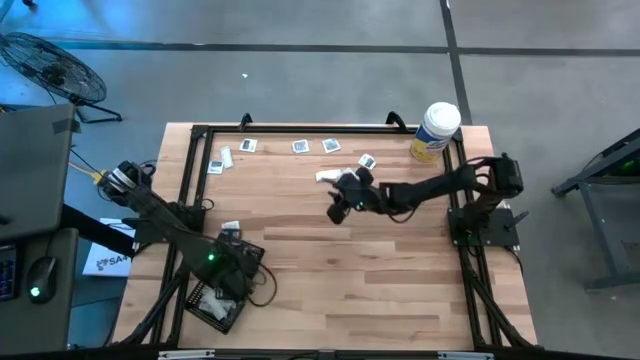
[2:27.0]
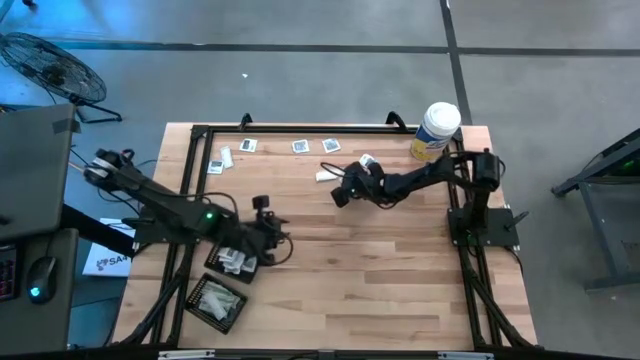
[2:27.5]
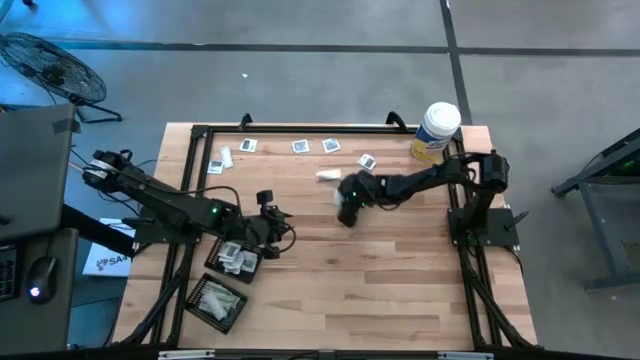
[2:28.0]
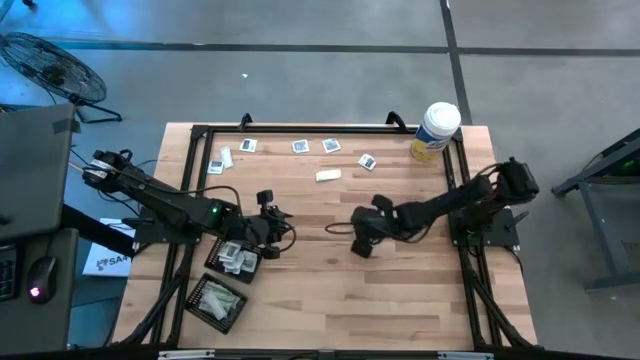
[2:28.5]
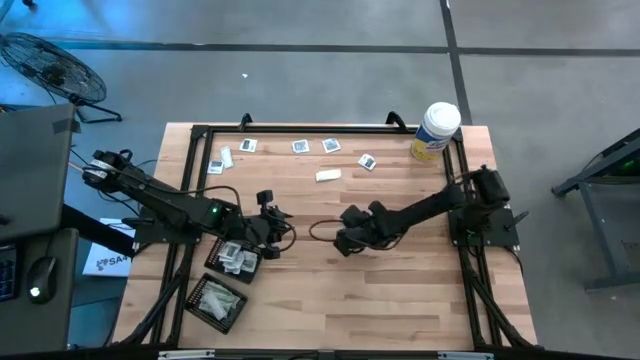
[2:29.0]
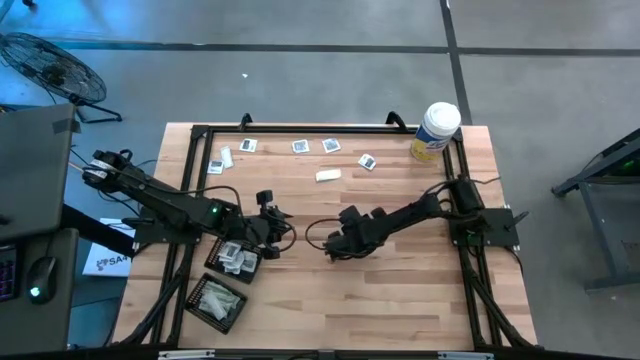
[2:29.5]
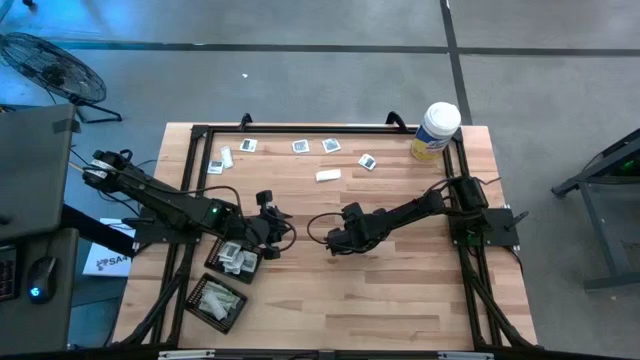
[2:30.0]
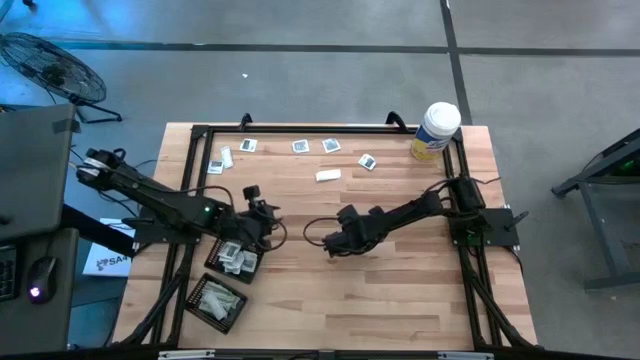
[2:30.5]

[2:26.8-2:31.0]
Task: Pick & Place First Aid Supplies
Put the towelette pack into the top black bin

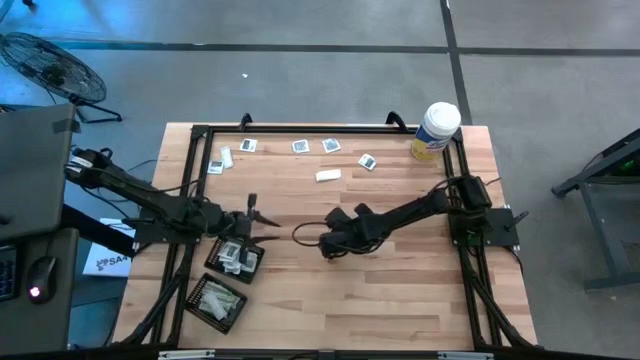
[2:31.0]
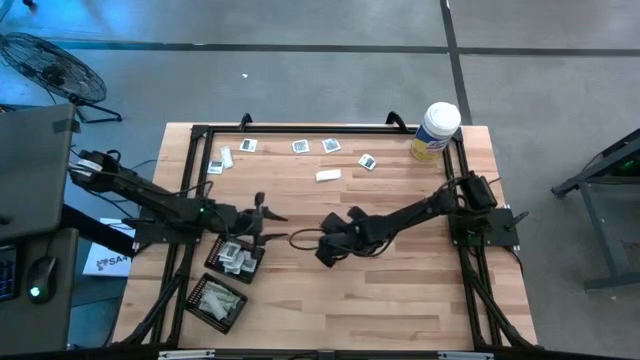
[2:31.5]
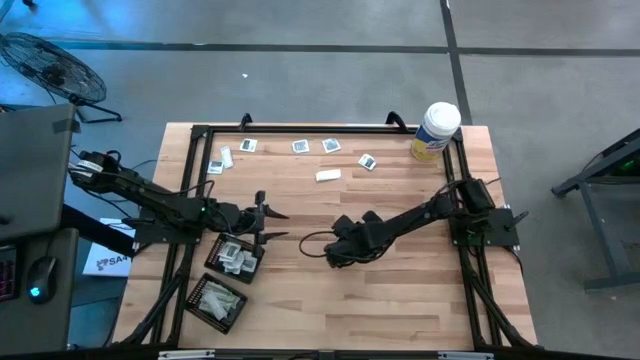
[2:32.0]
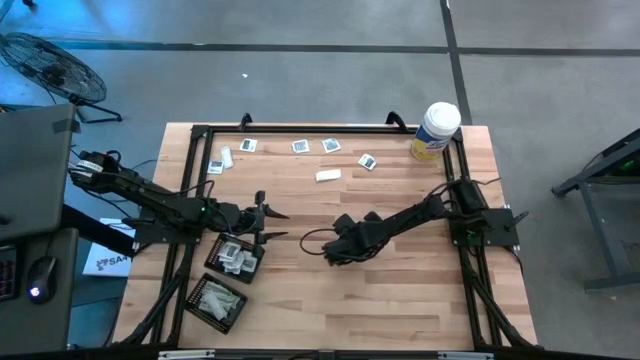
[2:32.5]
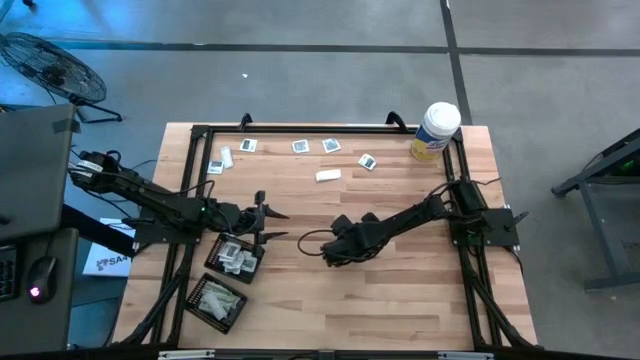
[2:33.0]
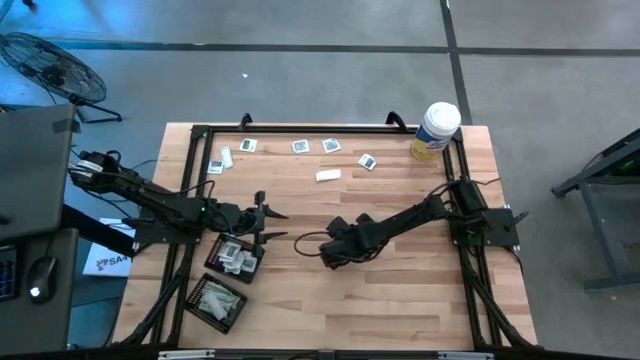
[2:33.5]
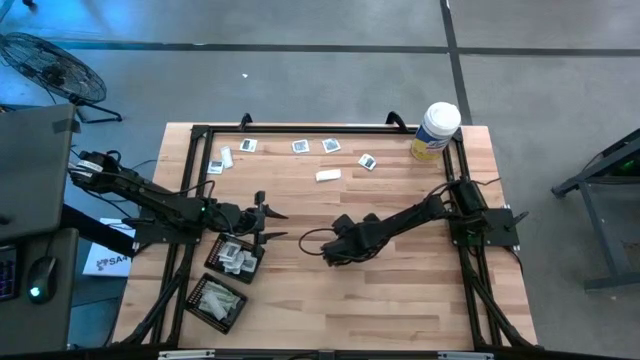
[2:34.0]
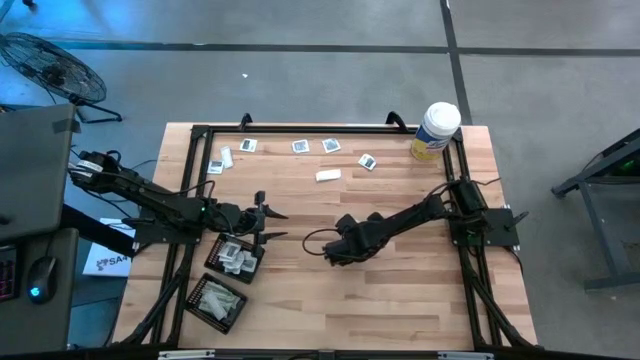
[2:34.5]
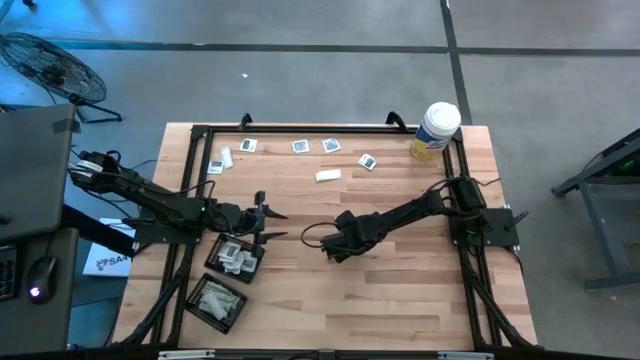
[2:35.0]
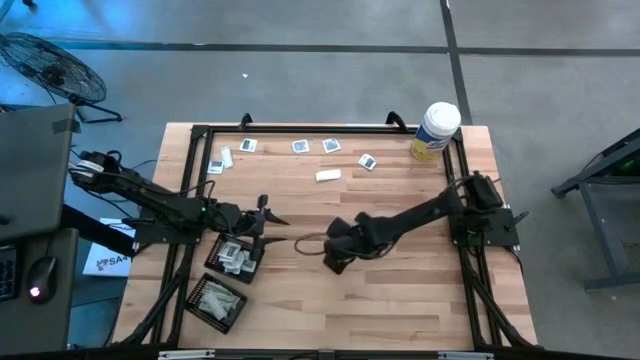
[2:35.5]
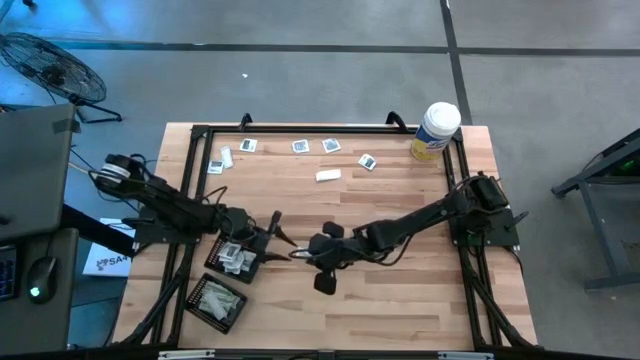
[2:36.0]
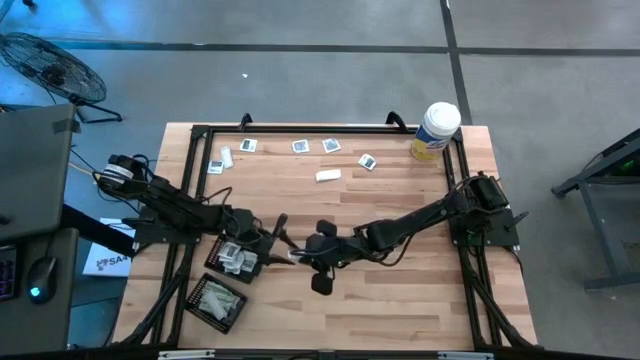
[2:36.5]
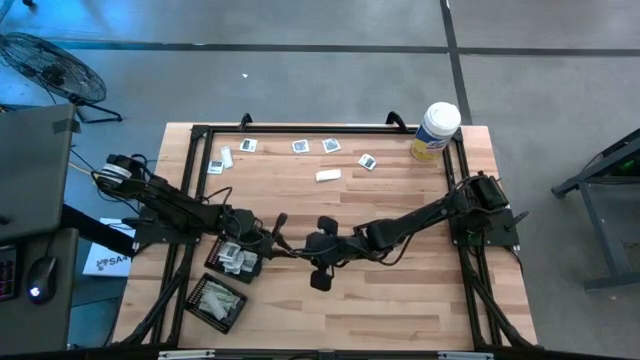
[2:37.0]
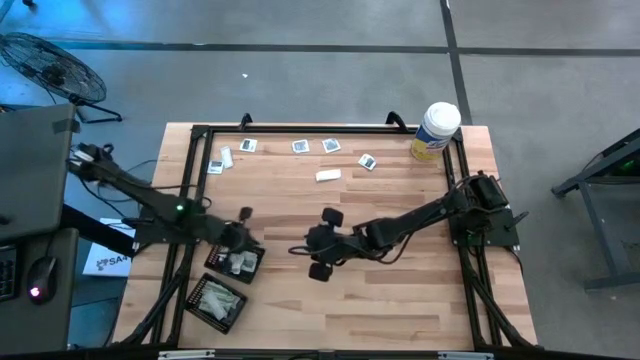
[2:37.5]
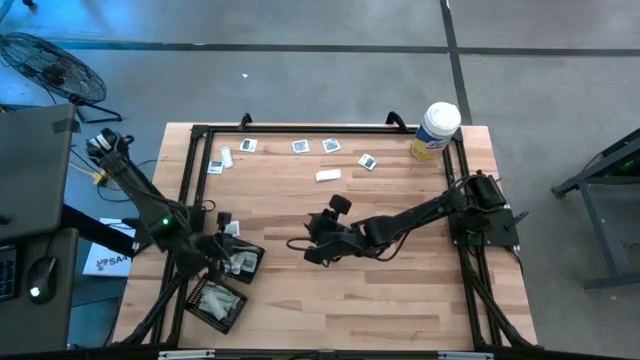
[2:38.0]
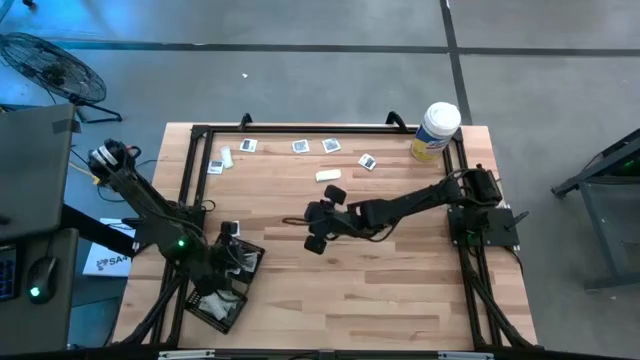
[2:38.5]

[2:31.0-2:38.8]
Put the towelette pack into the top black bin

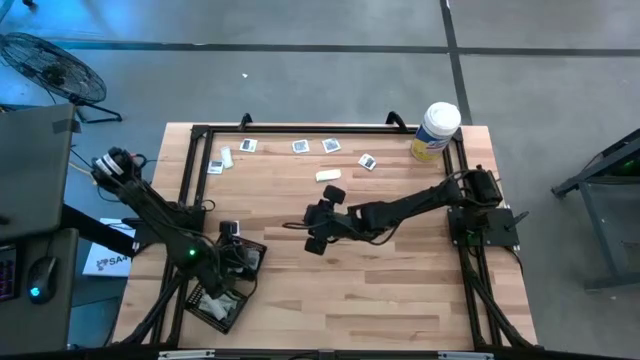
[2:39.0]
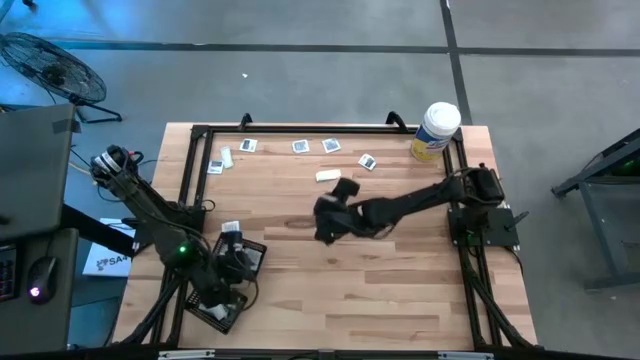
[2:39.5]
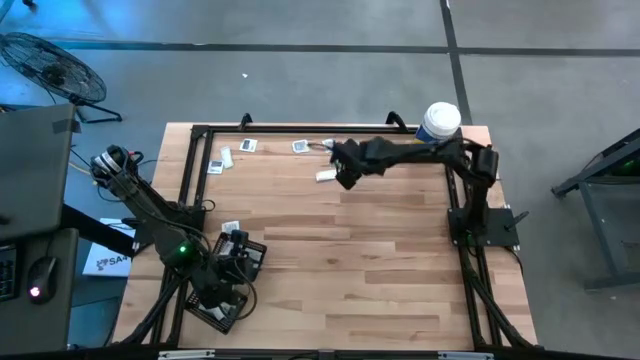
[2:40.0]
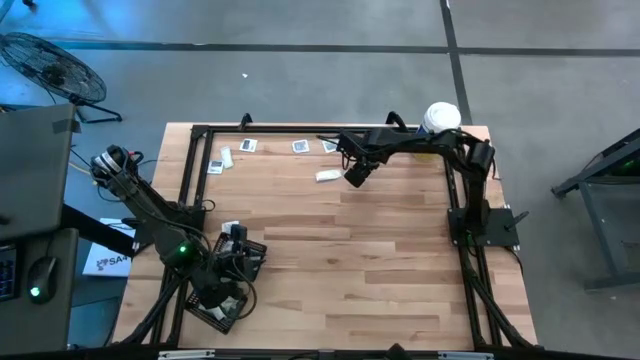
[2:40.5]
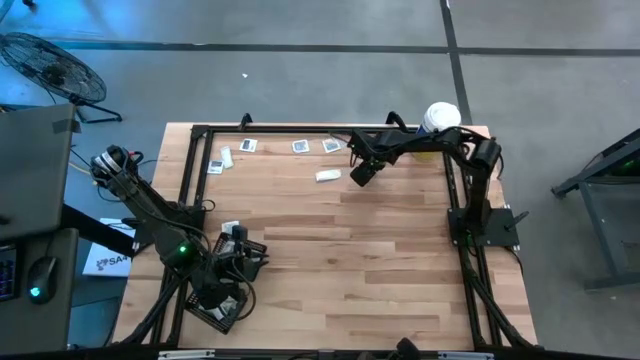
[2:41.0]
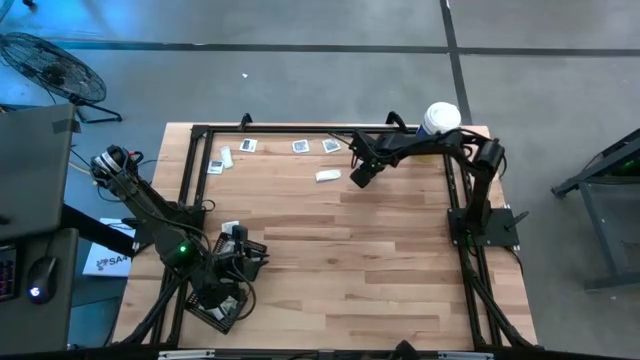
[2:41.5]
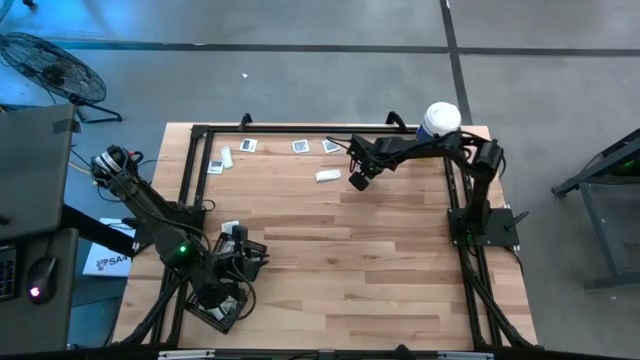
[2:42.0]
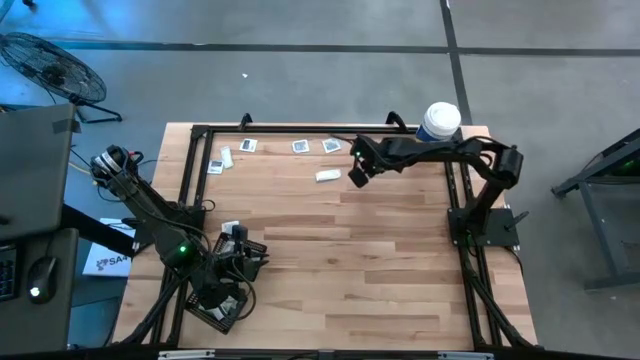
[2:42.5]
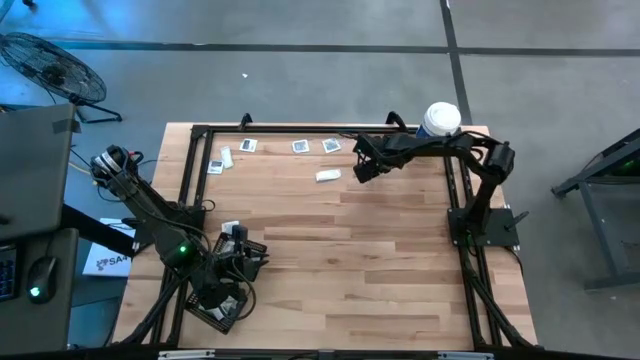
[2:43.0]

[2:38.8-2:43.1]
Put the towelette pack into the top black bin

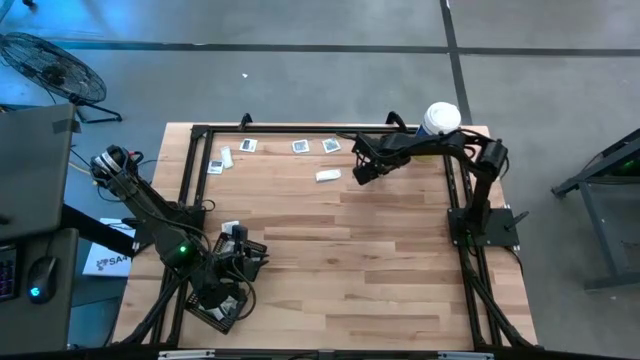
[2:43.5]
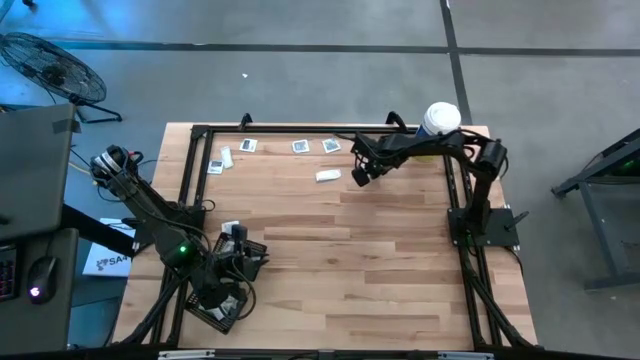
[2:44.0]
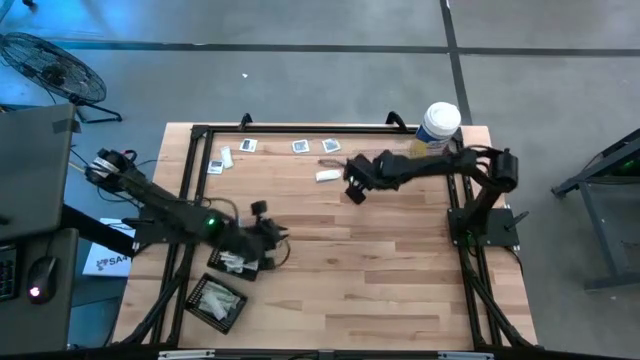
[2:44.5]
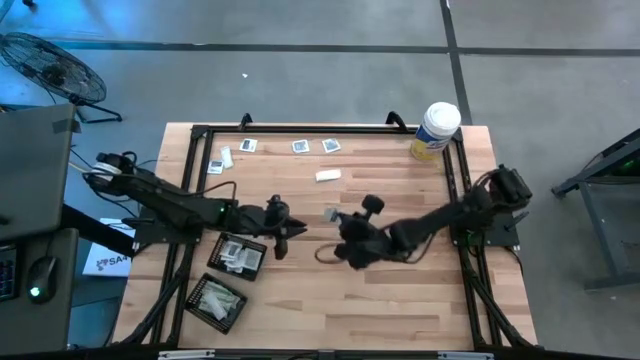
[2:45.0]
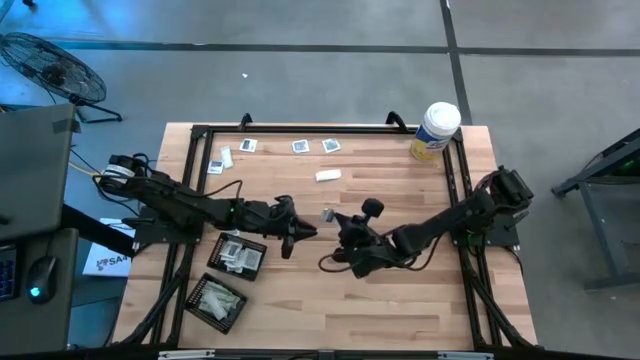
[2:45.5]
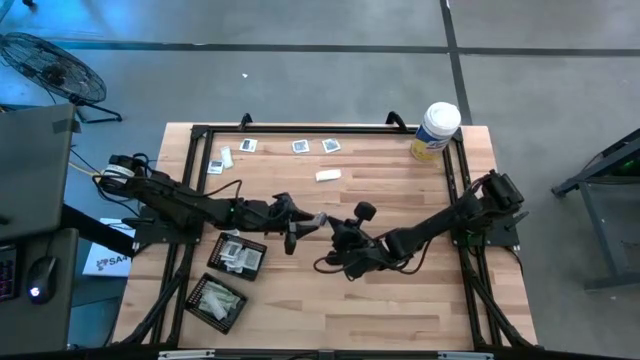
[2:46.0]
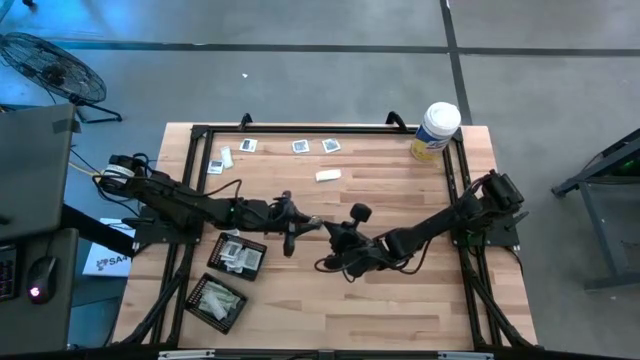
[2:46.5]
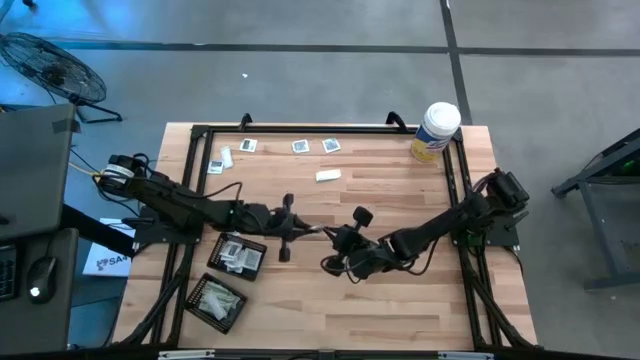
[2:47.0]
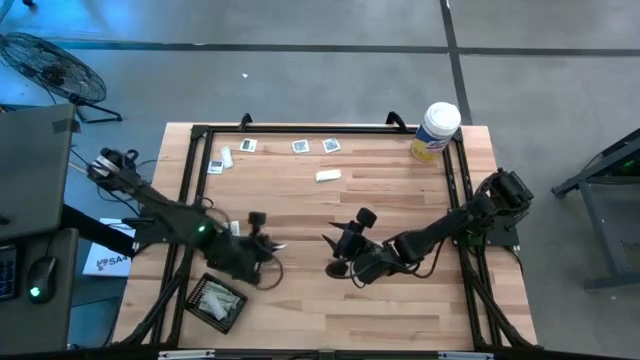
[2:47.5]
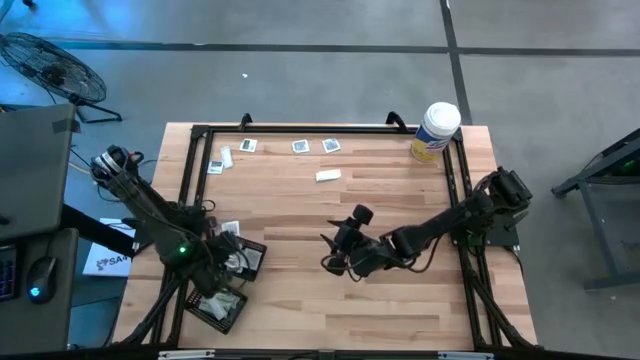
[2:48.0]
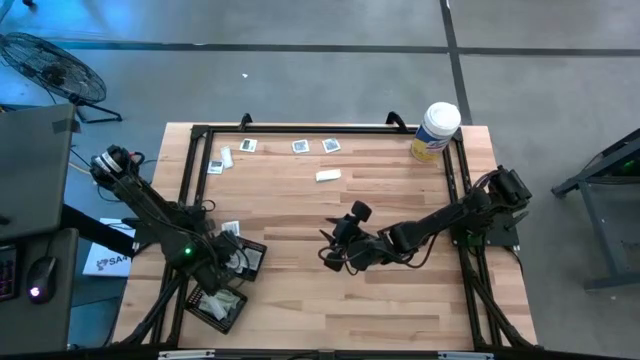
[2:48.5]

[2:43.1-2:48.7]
Put the towelette pack into the top black bin
